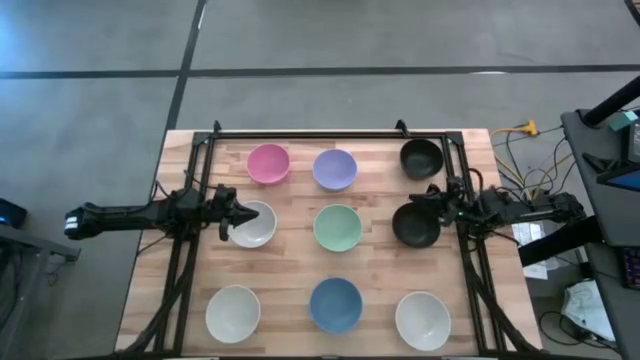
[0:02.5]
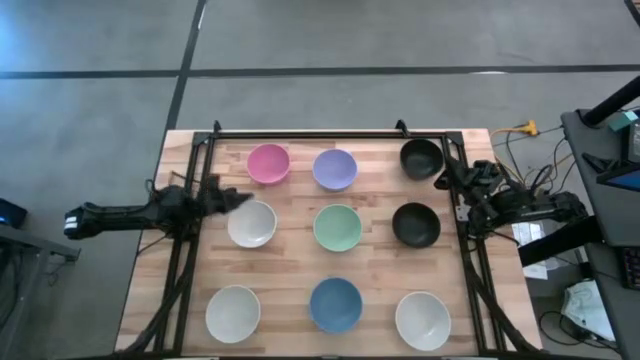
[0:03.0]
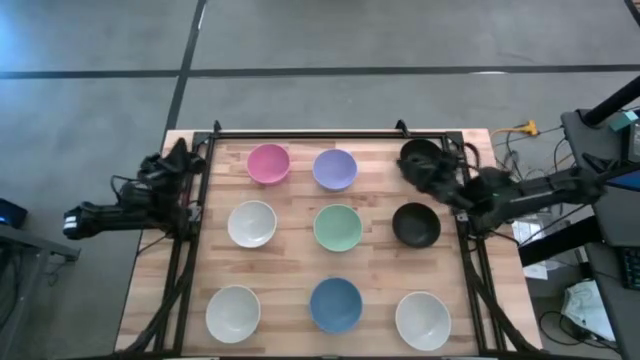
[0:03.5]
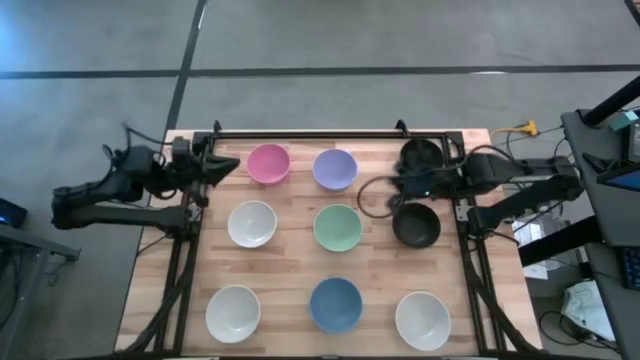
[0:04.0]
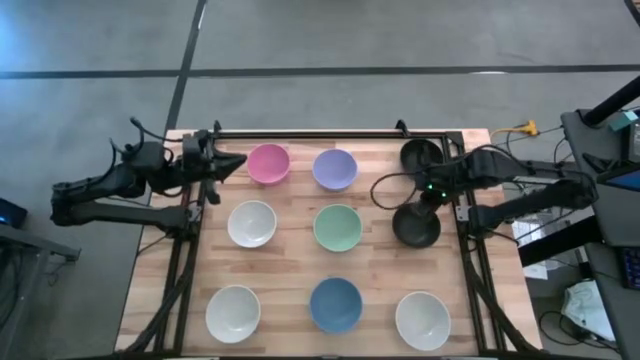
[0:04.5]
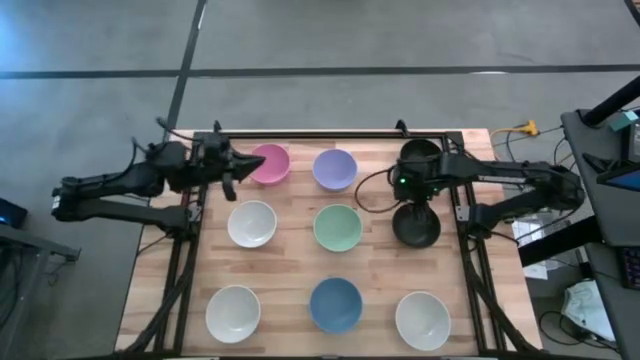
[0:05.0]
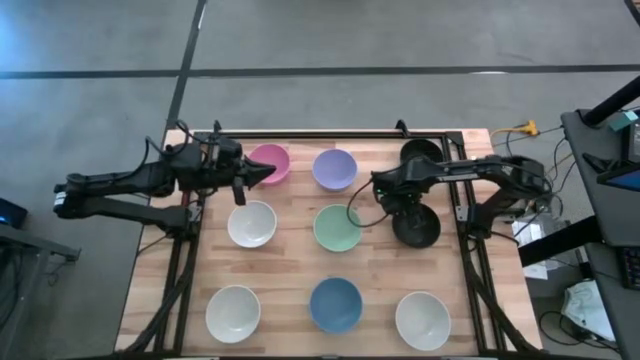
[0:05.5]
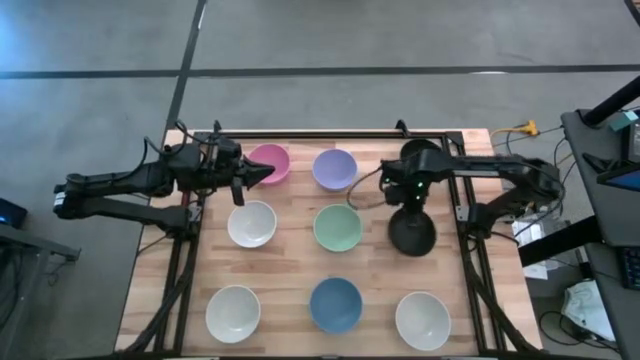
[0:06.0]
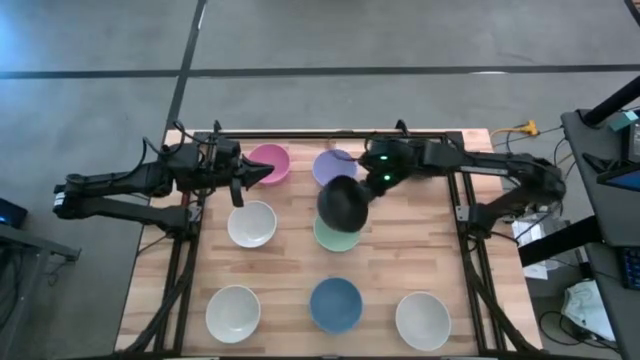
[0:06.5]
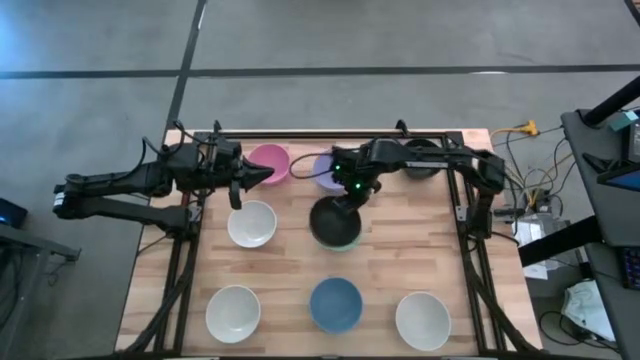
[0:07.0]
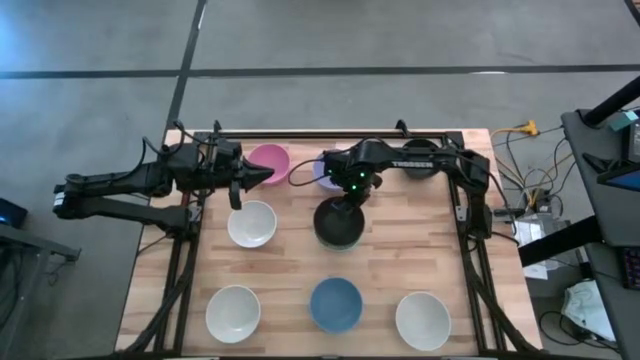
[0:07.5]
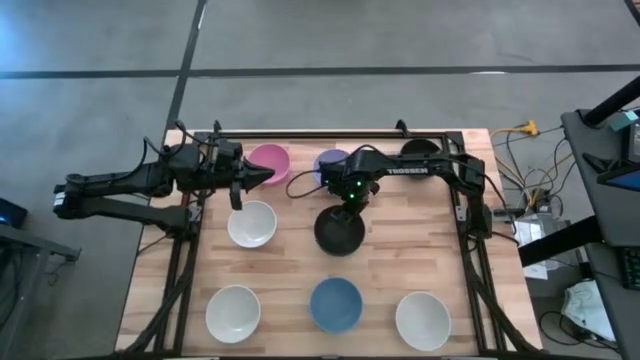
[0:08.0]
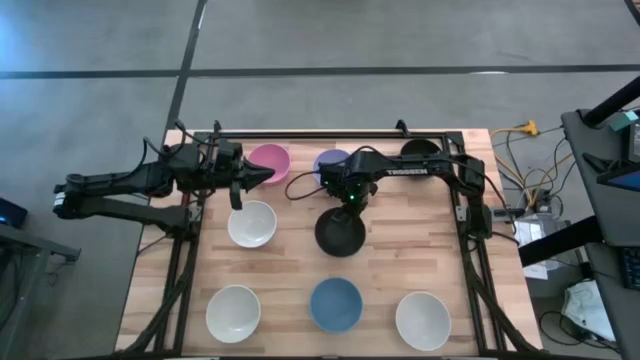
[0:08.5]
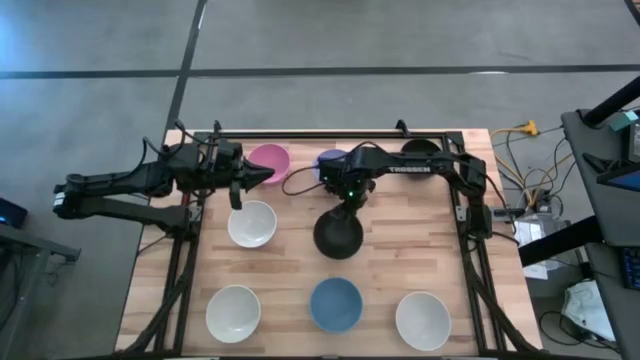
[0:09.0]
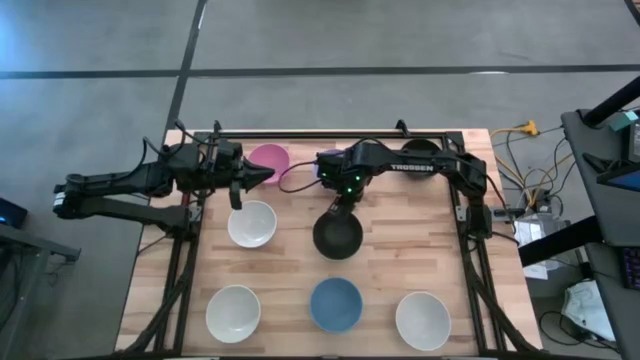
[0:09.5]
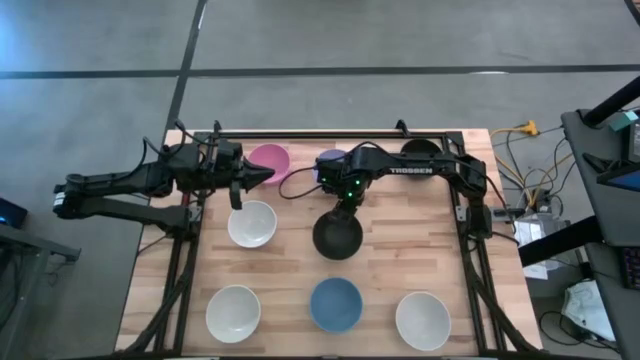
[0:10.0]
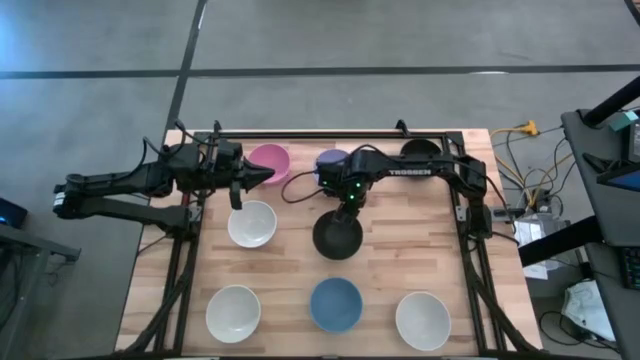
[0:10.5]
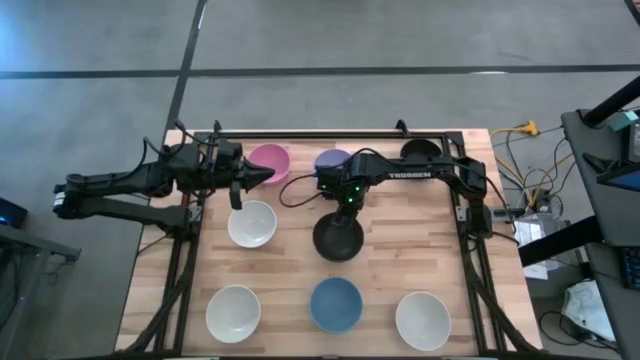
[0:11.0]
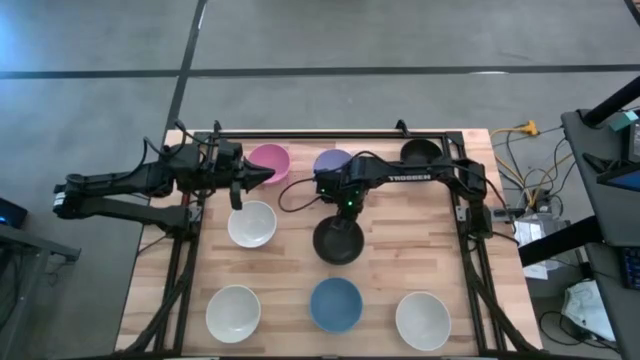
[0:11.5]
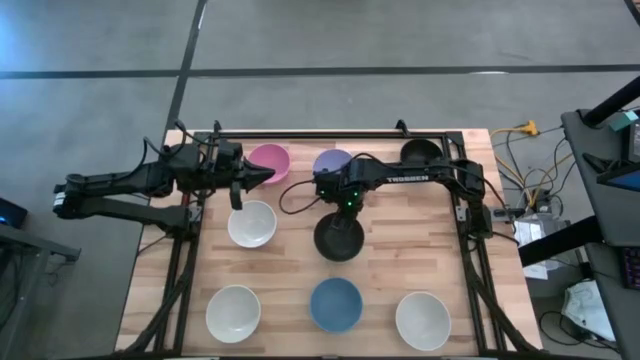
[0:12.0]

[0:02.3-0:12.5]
Task: Nest bowls inside each other
Stack the bottom black bowl on top of the green bowl

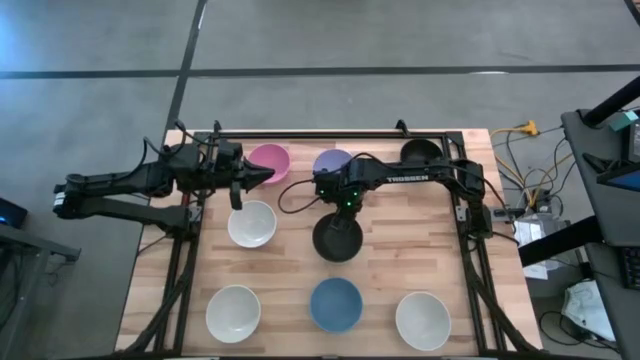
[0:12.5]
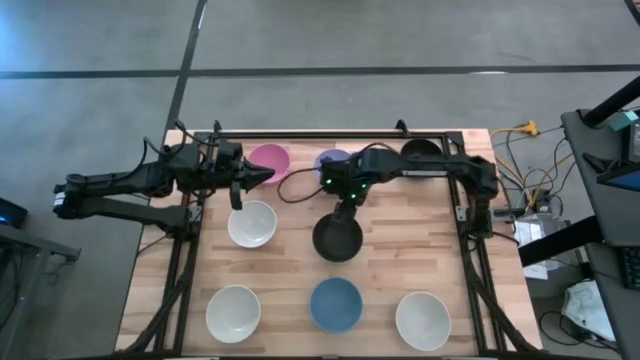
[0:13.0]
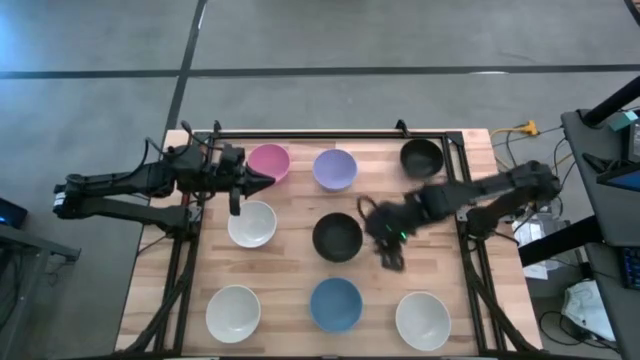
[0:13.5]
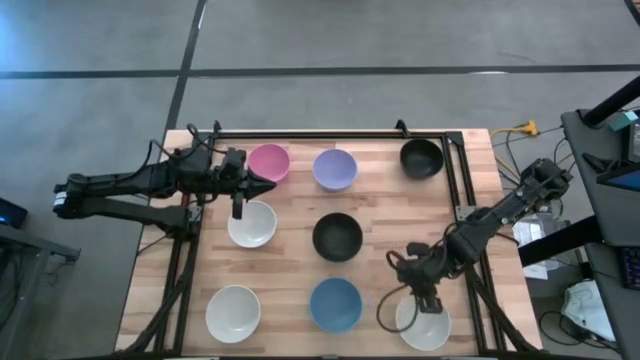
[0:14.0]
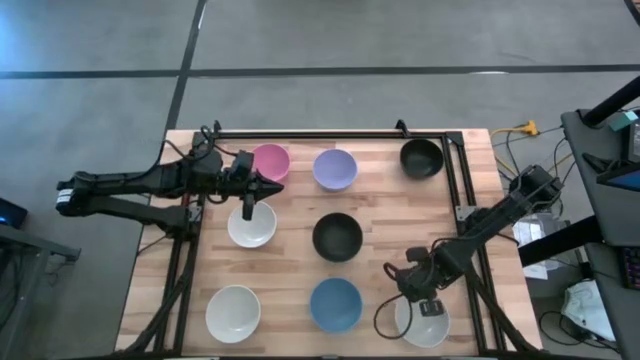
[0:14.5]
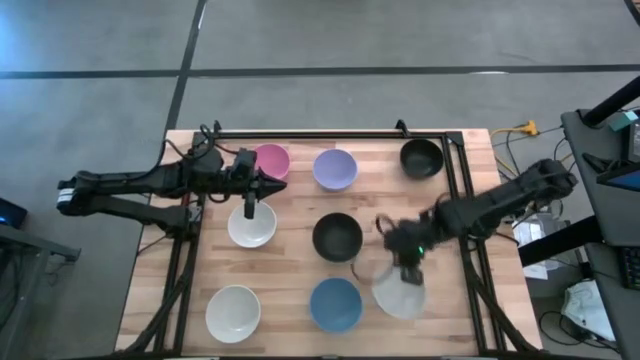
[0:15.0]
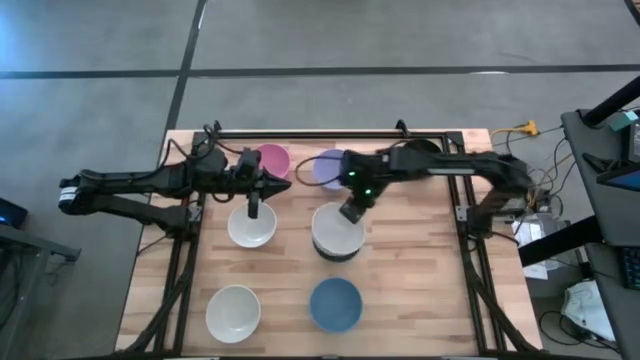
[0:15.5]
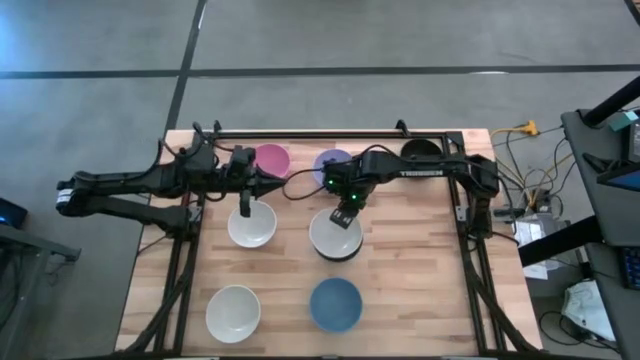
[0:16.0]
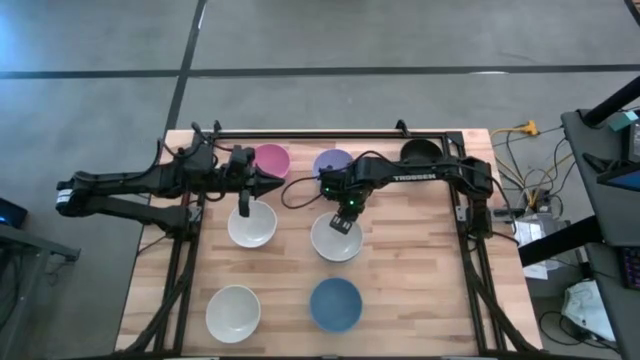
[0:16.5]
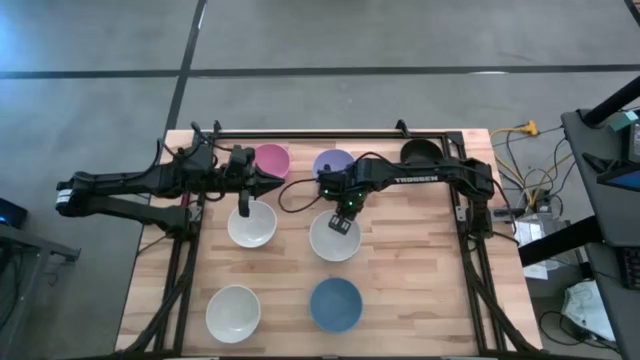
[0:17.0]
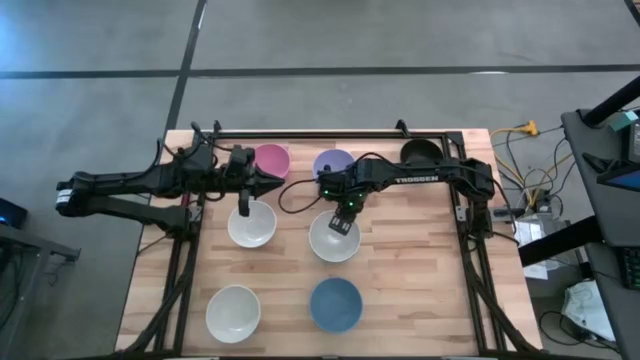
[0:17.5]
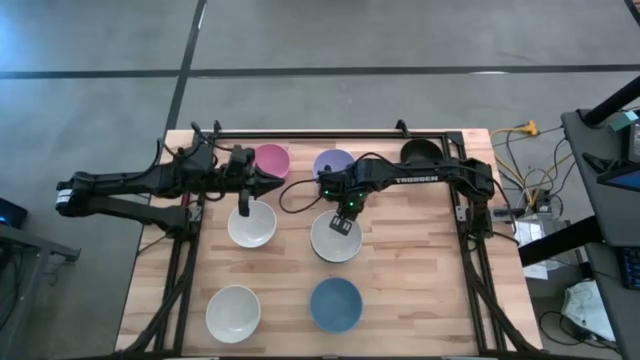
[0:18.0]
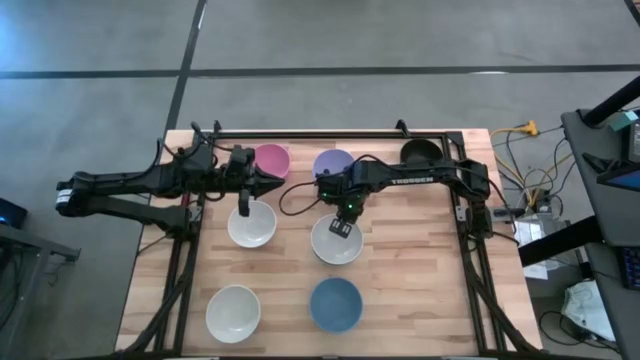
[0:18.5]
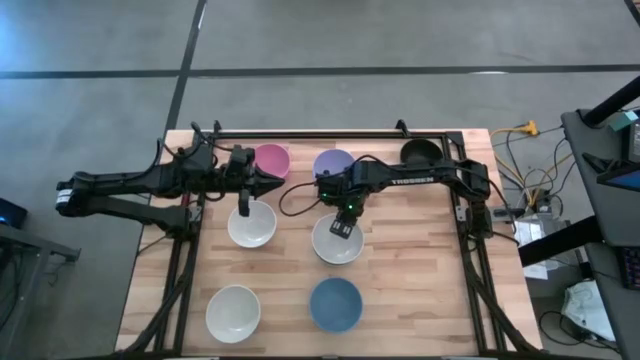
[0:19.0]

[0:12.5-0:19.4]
Stack the bottom right white bowl on top of the stacked black bowl

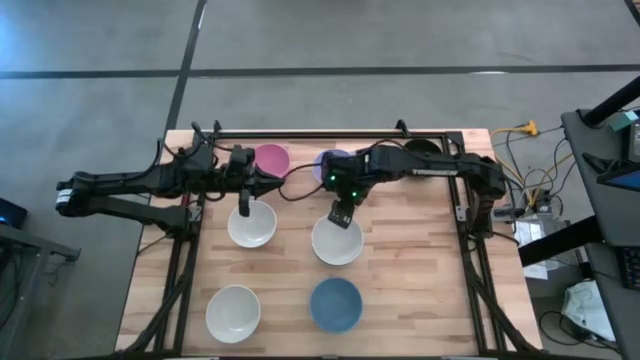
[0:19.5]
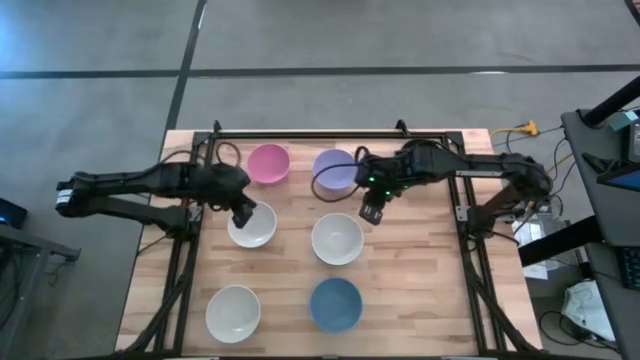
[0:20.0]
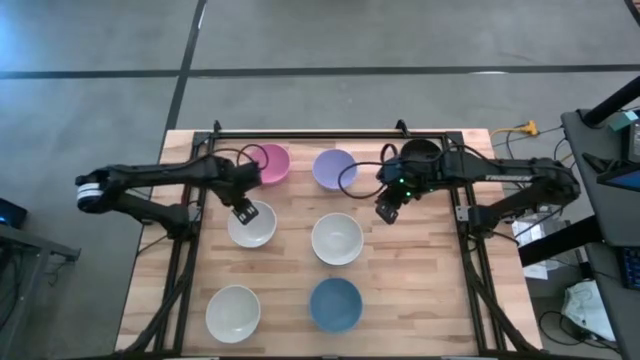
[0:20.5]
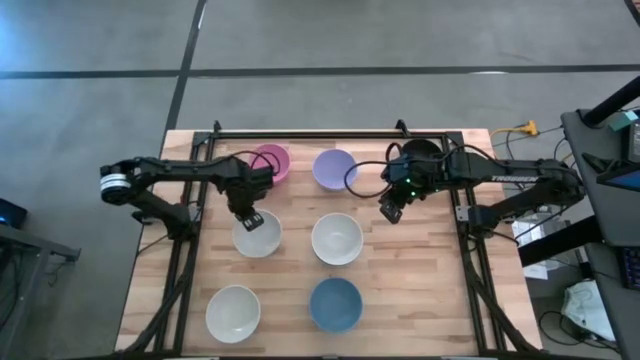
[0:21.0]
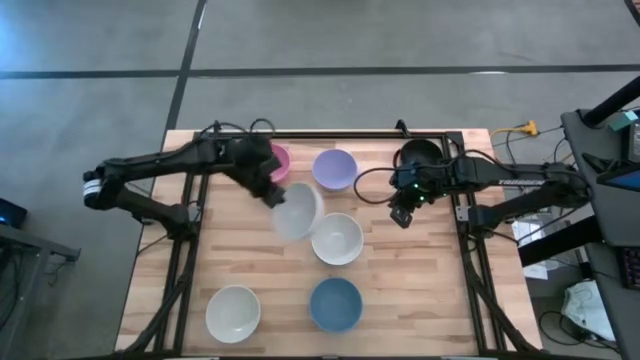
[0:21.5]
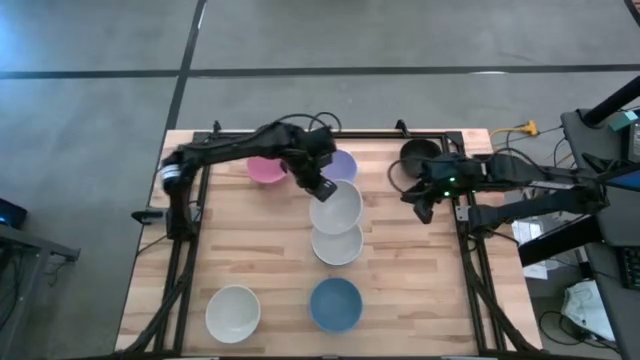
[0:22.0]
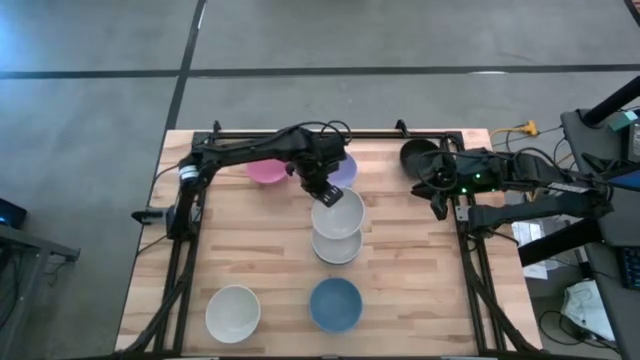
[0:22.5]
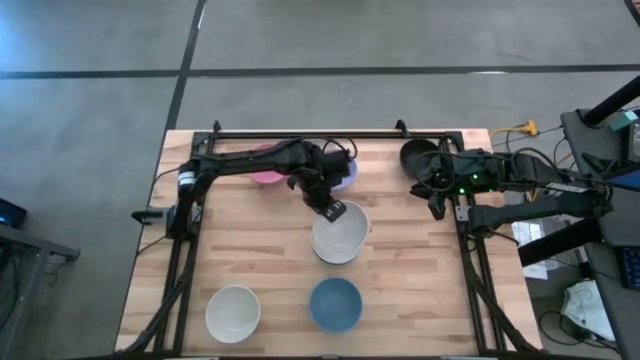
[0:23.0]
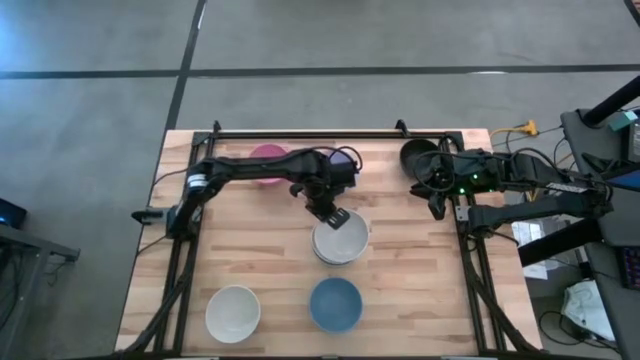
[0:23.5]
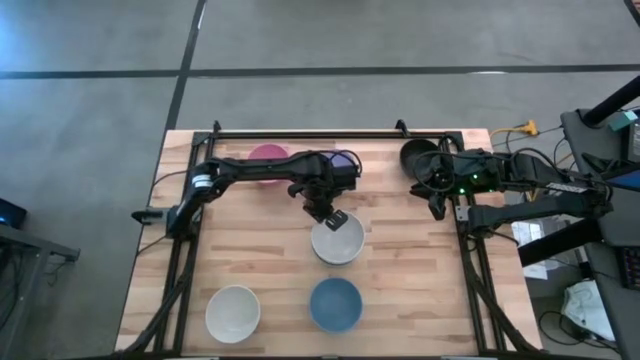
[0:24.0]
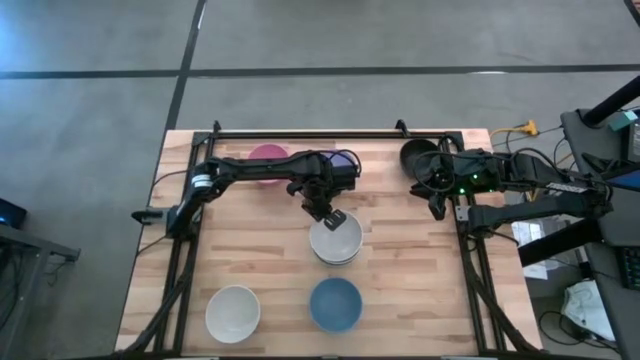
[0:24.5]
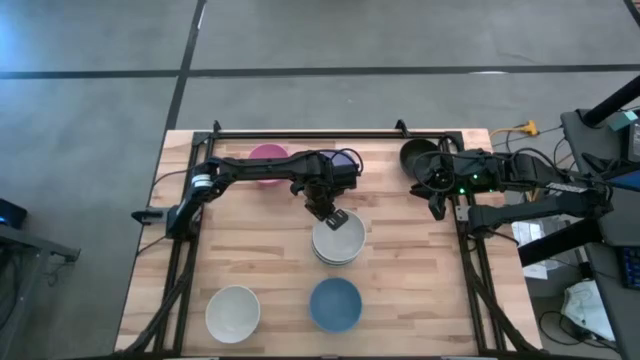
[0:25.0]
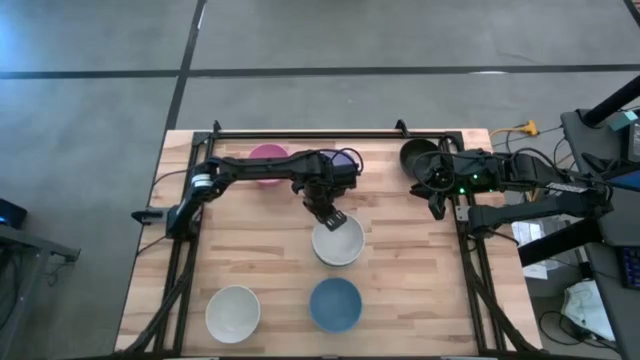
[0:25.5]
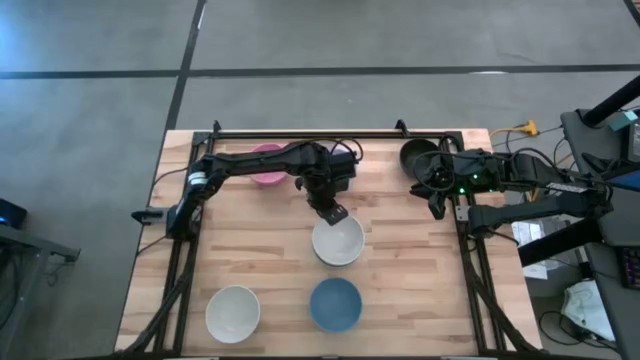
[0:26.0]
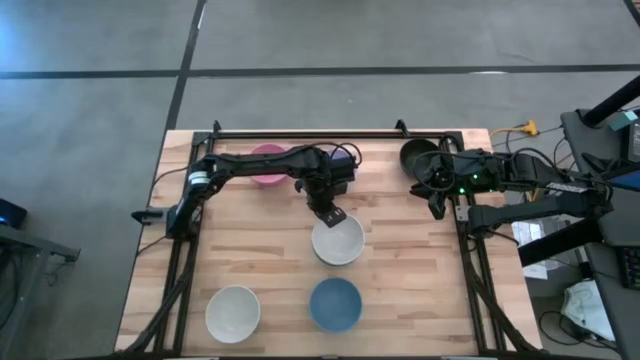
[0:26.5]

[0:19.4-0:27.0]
Stack the top white bowl on top of the stacked white bowl
